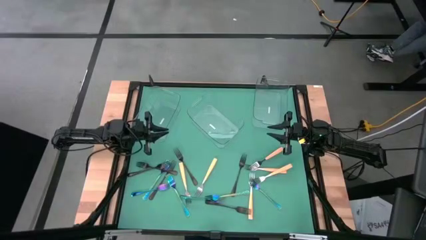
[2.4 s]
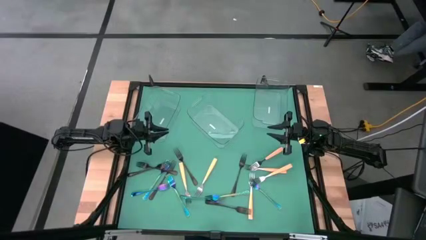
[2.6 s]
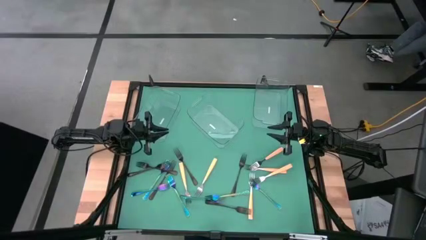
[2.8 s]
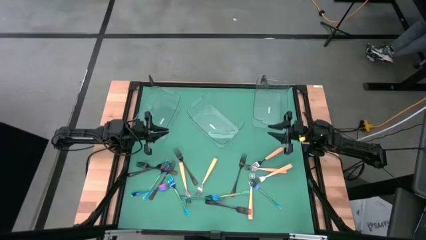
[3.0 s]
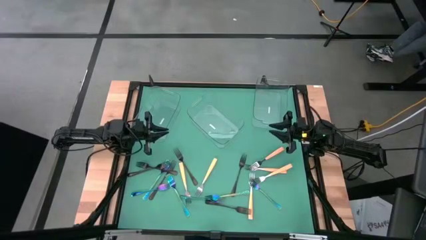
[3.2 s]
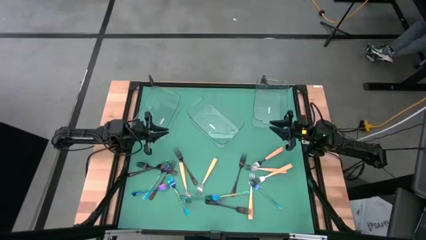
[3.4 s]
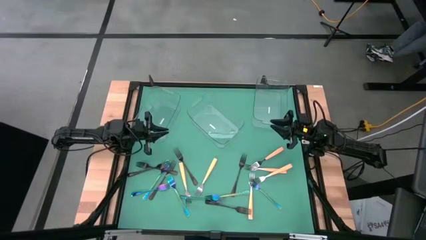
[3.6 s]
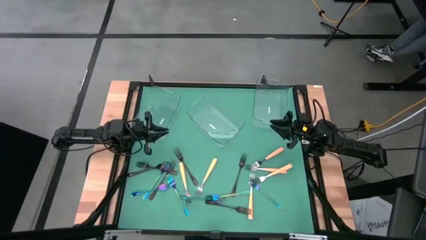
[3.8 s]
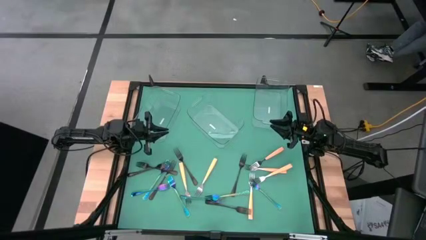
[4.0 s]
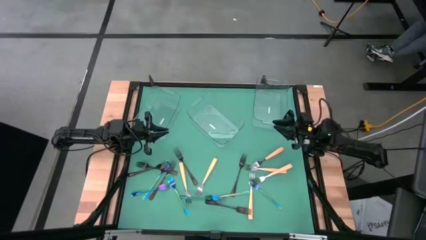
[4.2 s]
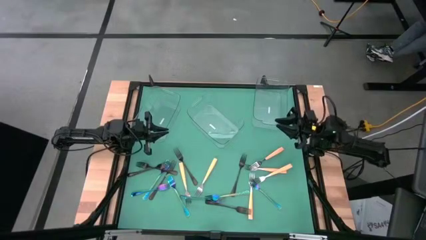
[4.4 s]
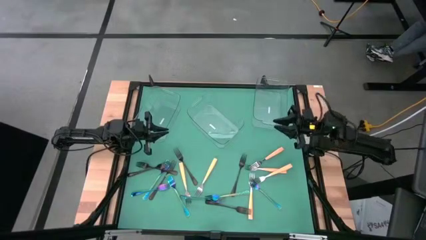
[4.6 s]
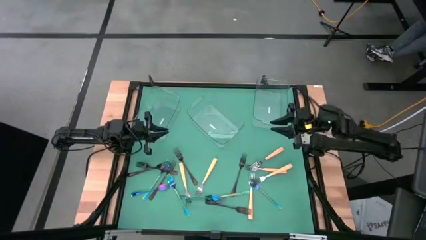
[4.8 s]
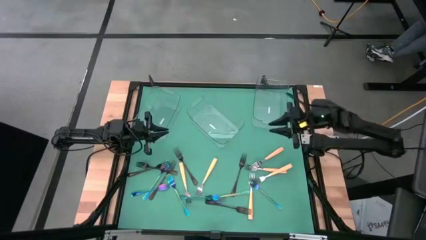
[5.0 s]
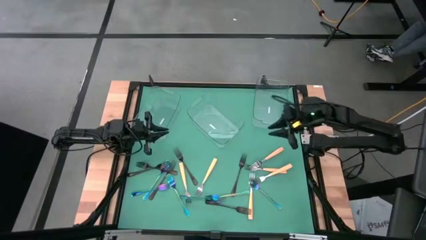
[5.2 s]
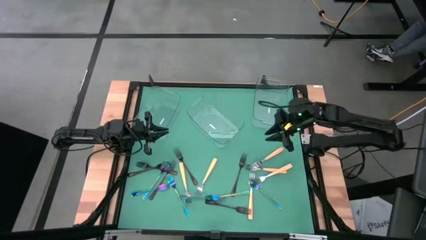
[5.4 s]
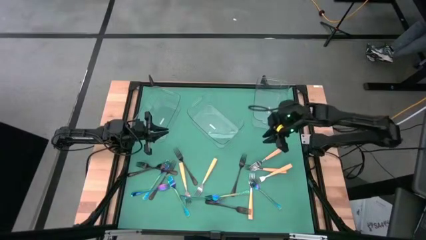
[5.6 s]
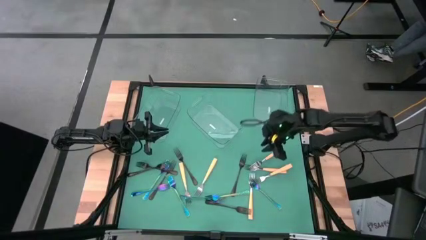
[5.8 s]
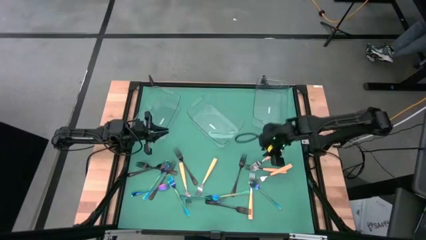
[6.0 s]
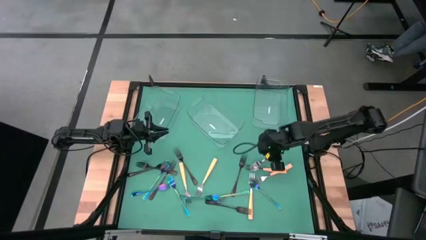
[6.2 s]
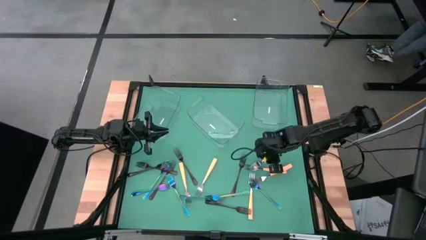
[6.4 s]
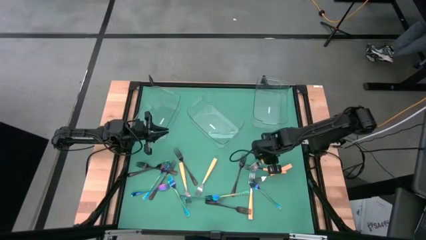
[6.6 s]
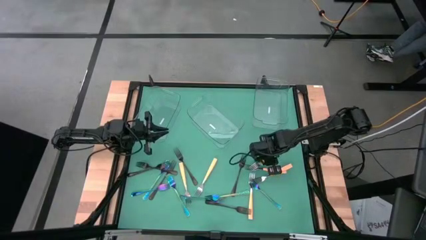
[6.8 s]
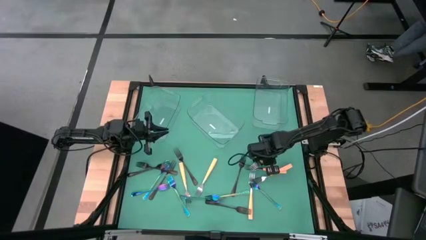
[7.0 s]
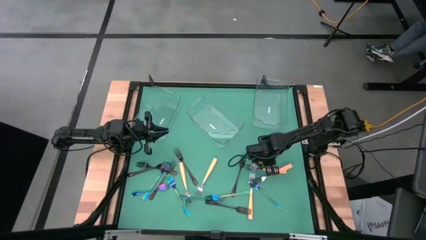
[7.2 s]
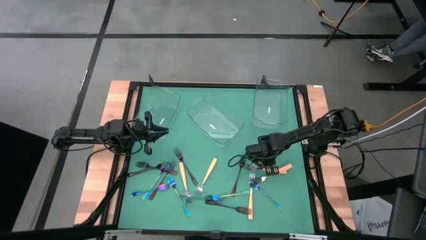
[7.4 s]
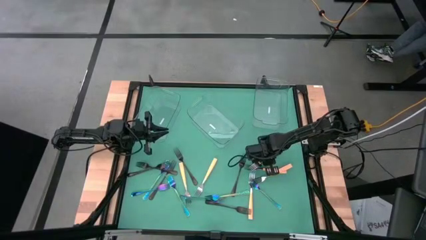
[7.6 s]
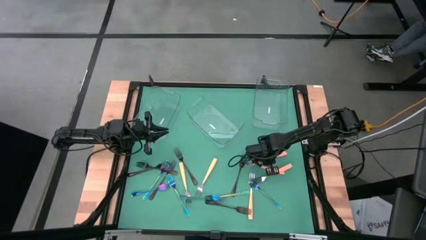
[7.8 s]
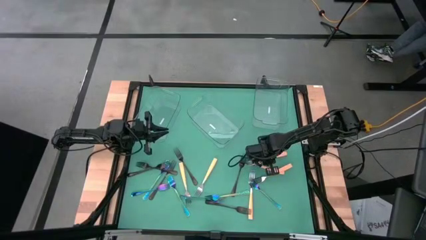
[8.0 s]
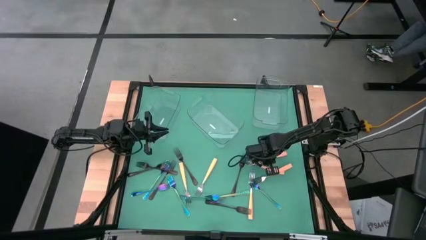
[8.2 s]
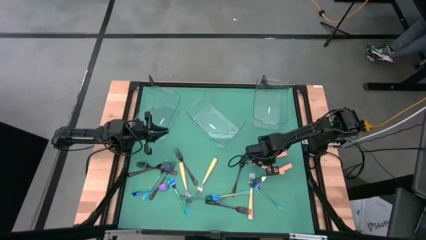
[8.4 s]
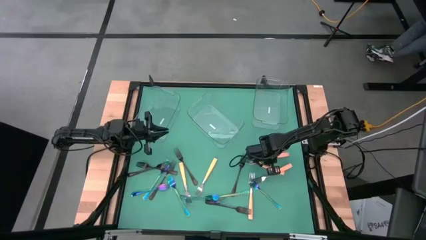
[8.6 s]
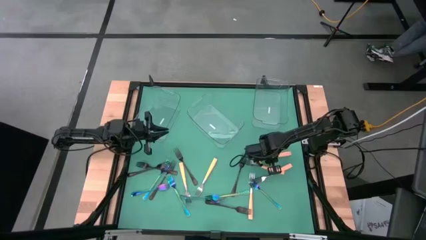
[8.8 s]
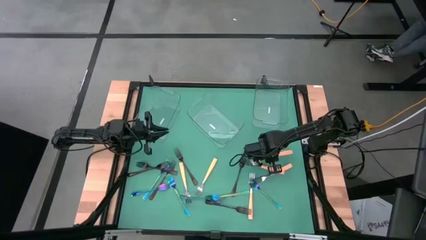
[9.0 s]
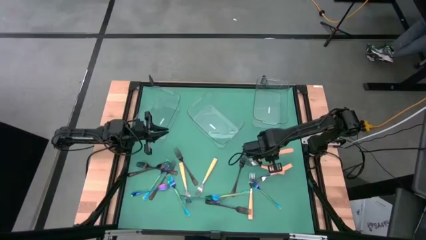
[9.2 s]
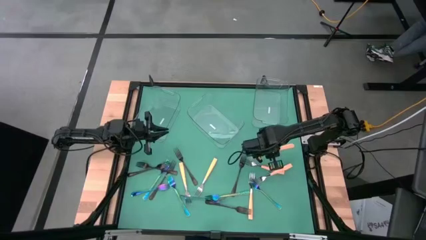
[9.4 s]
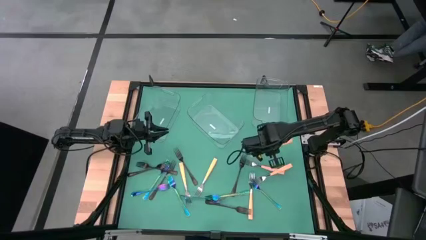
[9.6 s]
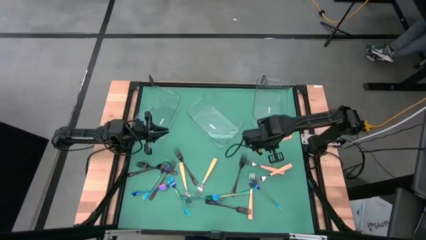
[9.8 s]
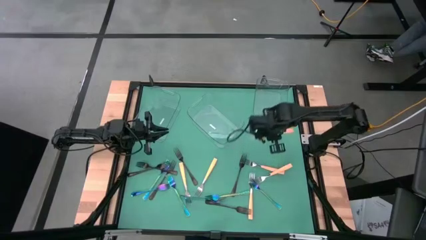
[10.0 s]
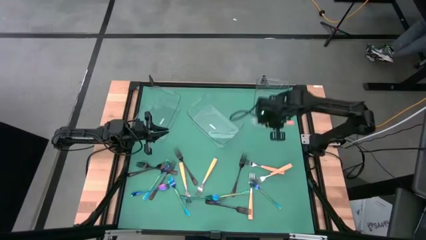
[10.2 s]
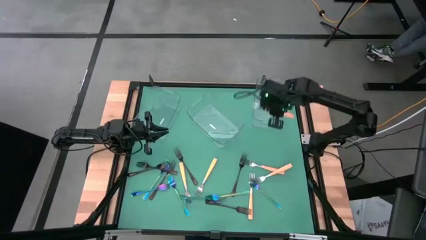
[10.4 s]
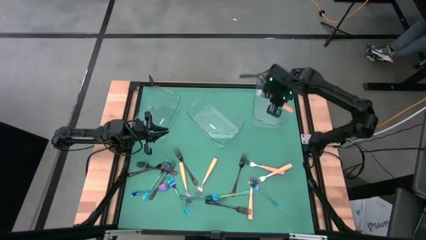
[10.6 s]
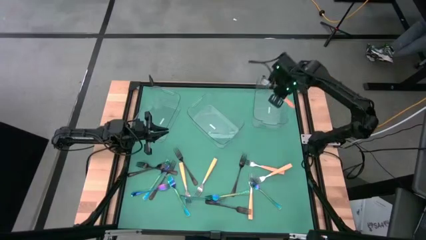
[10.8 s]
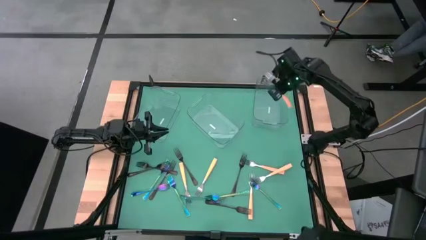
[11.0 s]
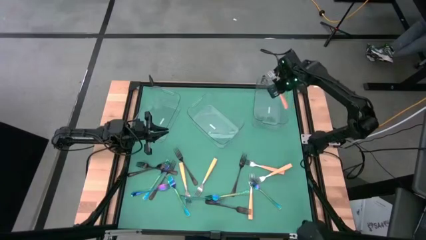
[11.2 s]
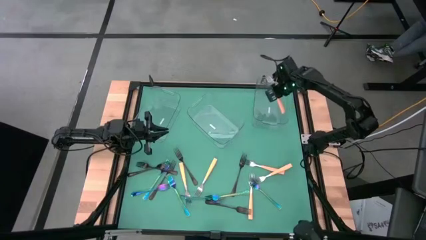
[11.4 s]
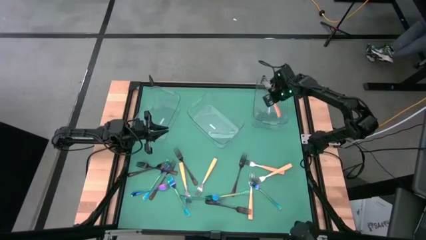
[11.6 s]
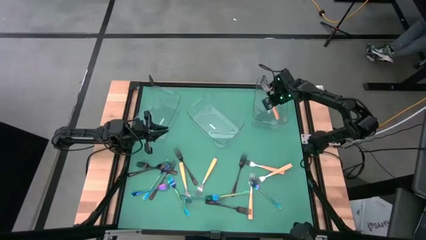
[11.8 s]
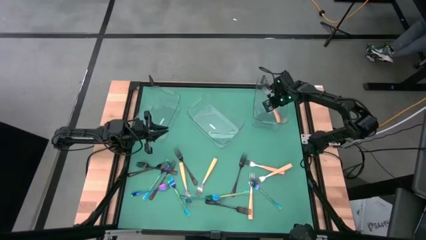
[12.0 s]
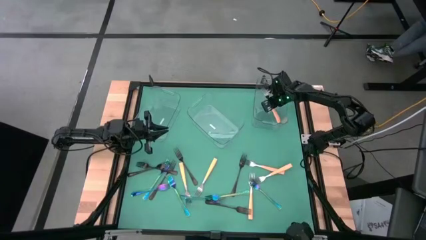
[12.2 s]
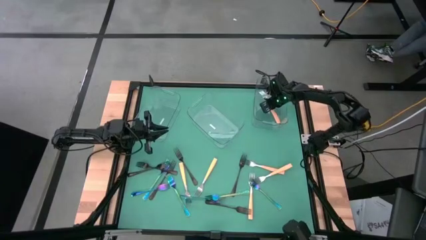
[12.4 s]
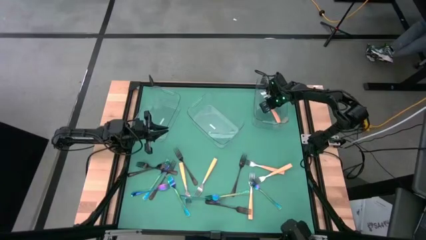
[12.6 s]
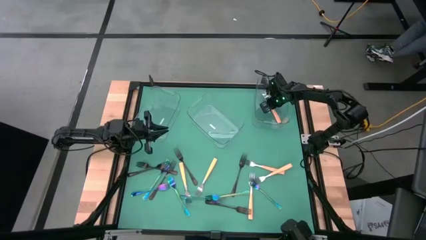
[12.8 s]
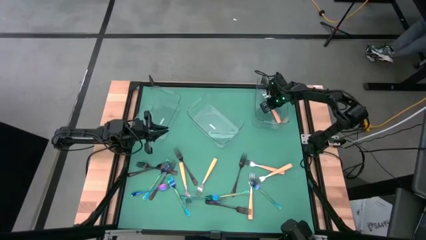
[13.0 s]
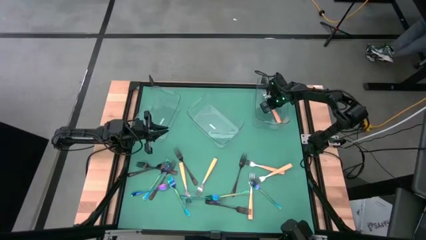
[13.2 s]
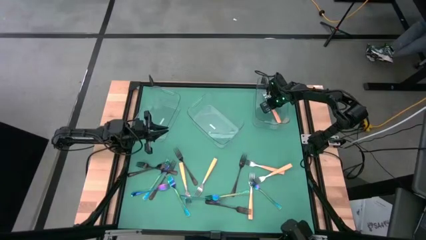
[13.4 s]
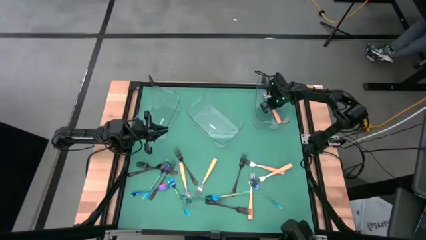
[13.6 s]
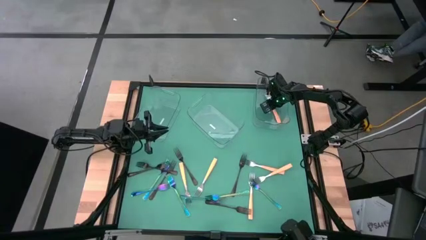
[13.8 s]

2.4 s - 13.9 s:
Task: Sort silverware by color (type)
Put the orange fork into the right transparent bin

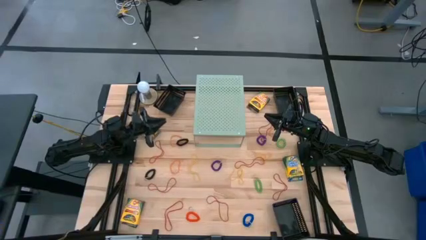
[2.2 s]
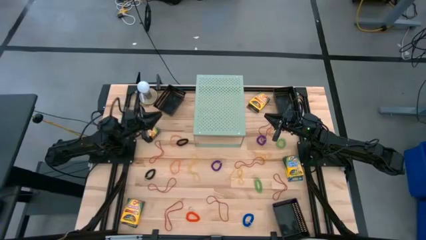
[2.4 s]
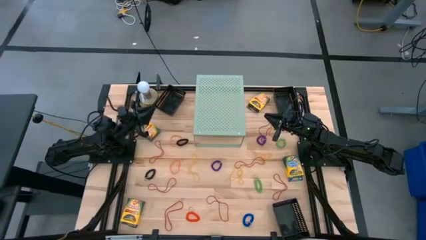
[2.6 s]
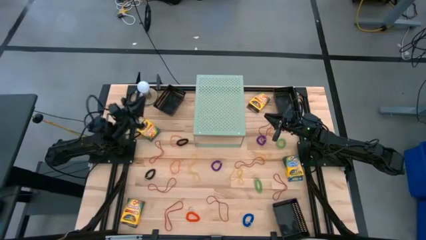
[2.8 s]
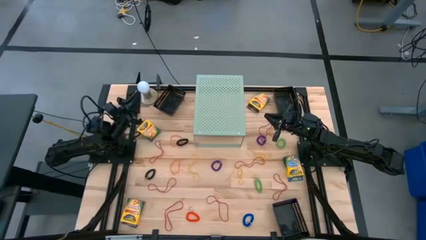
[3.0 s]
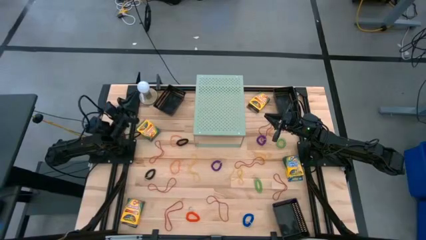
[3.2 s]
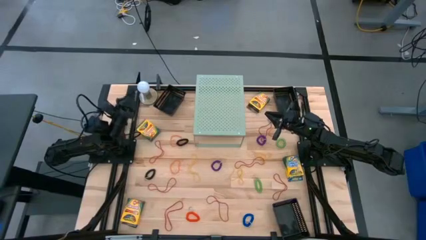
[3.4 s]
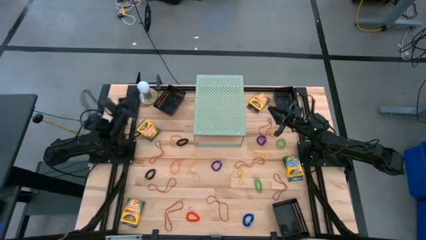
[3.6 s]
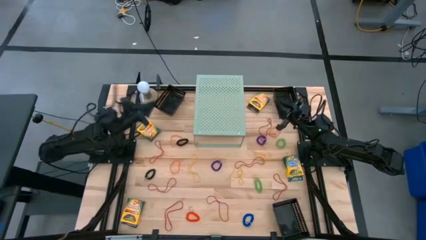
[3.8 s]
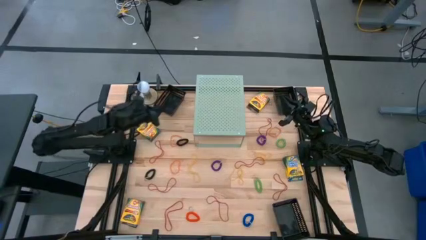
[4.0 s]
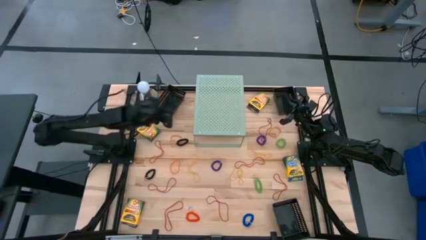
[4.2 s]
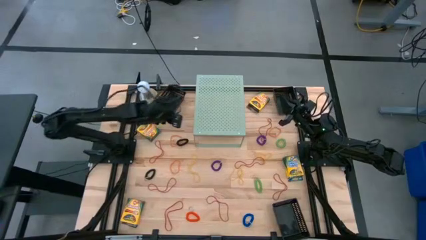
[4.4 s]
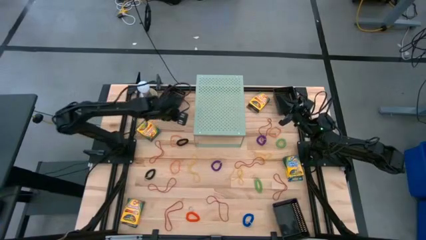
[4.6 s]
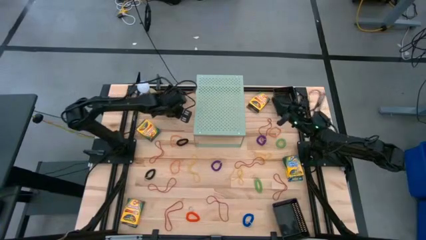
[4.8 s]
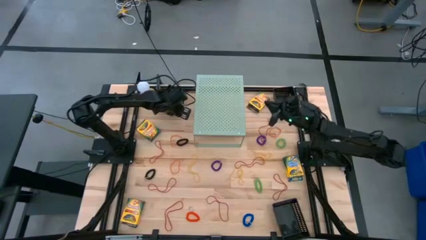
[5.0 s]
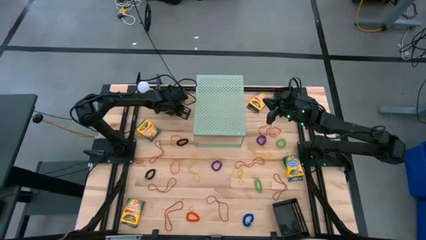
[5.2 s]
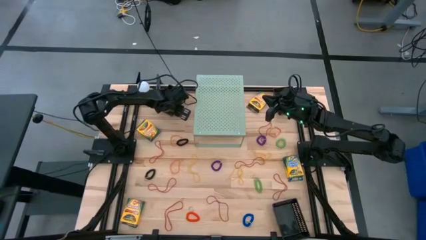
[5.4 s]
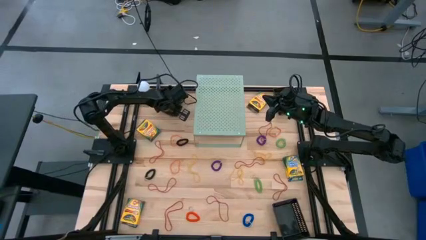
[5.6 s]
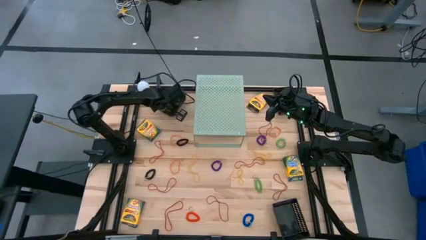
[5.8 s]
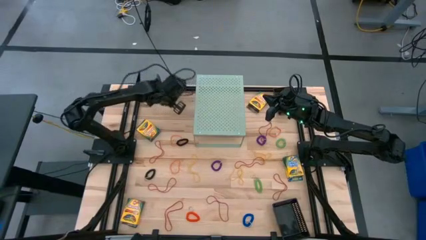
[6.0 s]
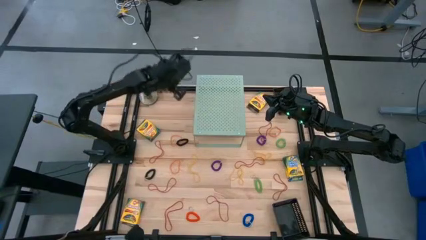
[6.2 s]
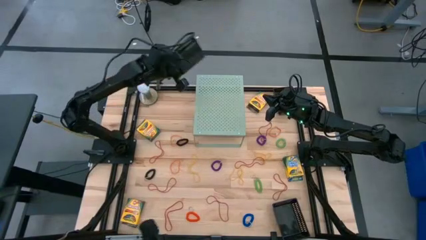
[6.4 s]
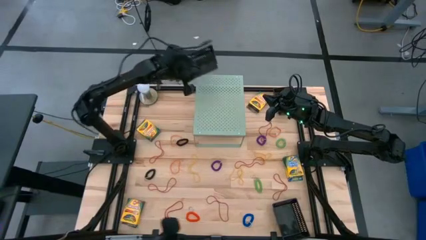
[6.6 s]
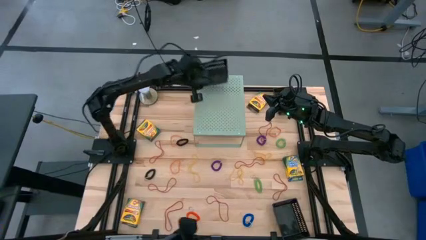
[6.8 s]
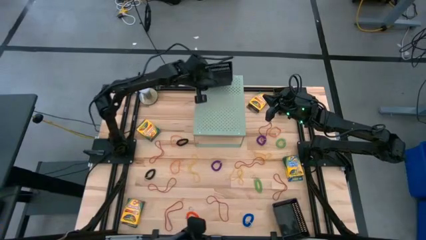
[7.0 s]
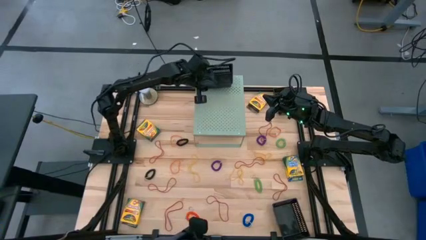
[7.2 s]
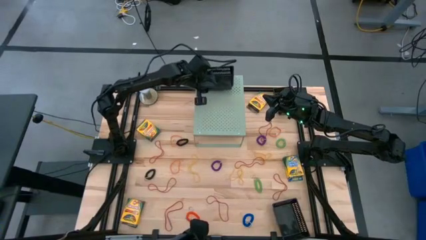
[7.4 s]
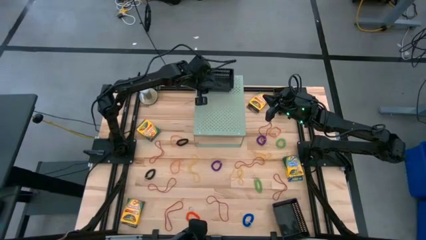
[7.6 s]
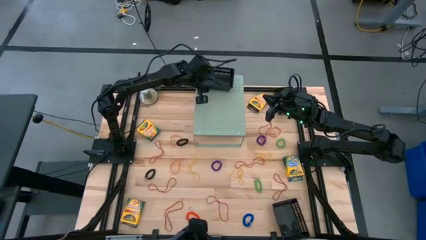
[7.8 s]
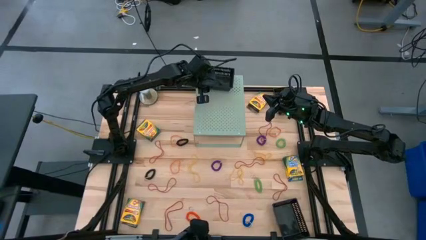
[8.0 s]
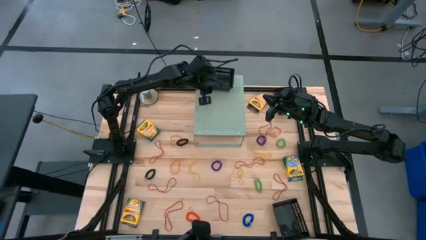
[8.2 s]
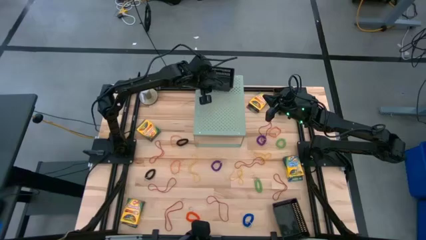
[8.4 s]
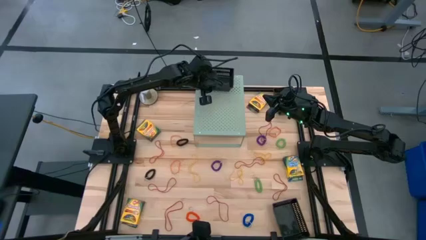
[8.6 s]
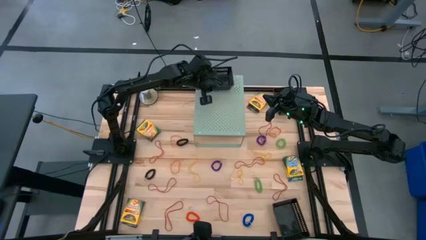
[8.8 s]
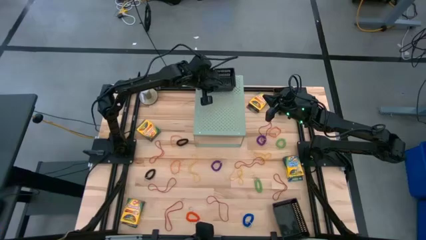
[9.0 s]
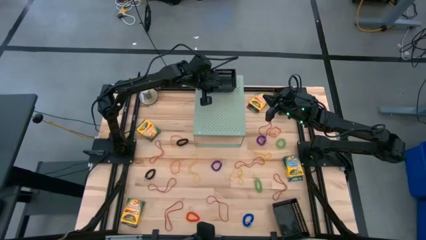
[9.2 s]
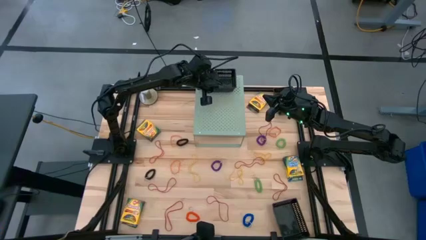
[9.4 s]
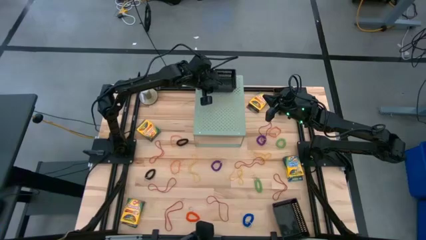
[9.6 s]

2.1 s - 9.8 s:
Task: Pick & Place Office Desk Supplies
Put the top left black bin on the shelf
